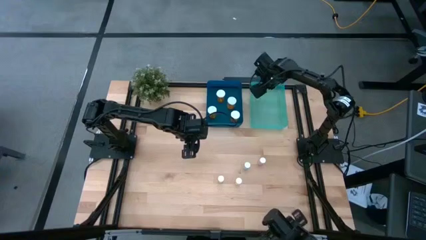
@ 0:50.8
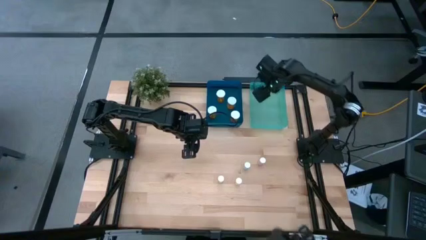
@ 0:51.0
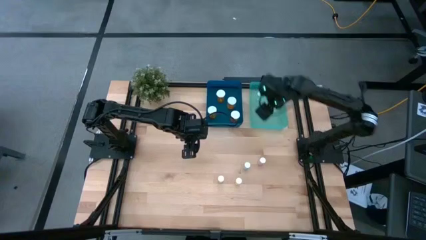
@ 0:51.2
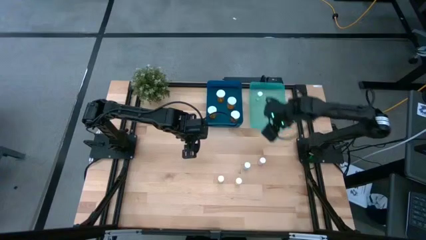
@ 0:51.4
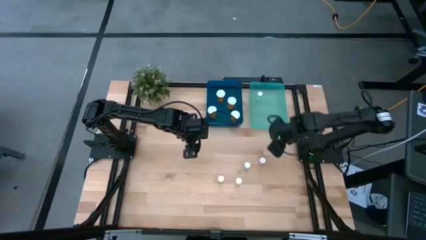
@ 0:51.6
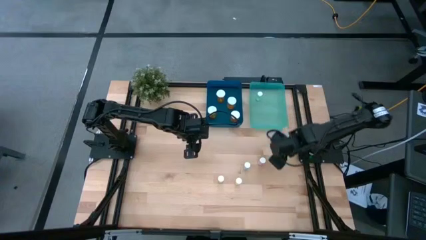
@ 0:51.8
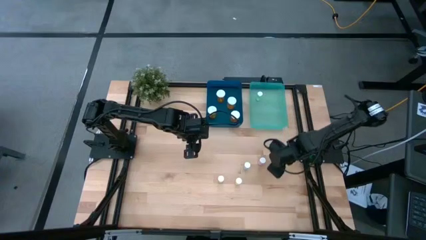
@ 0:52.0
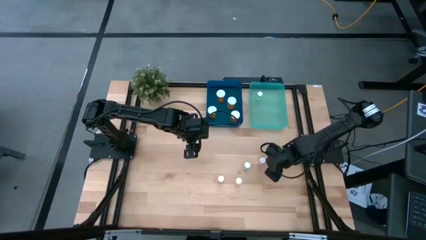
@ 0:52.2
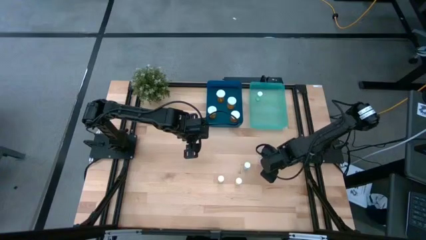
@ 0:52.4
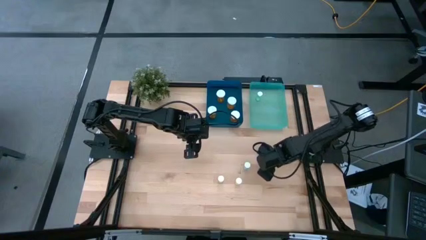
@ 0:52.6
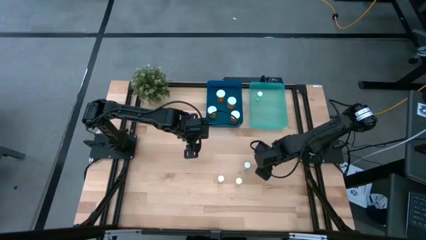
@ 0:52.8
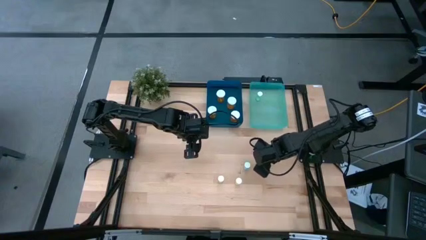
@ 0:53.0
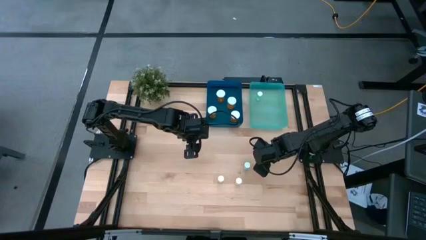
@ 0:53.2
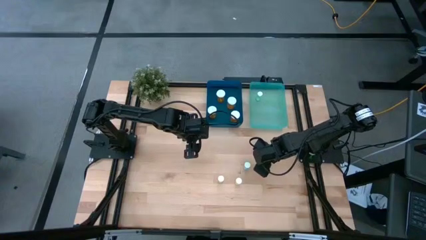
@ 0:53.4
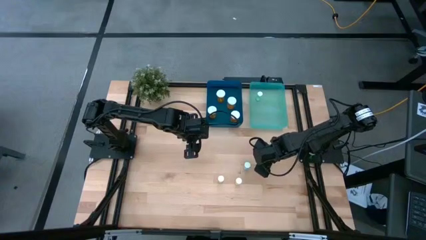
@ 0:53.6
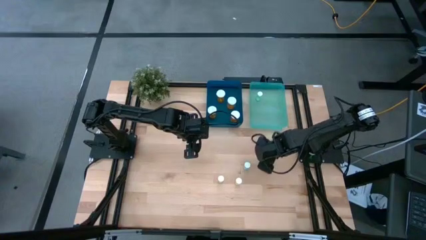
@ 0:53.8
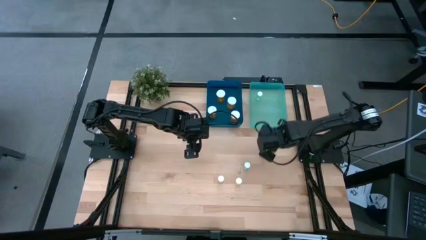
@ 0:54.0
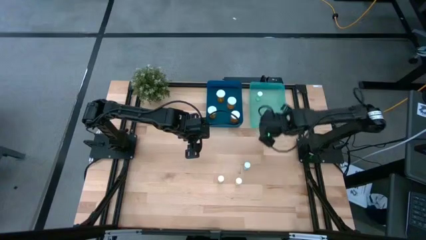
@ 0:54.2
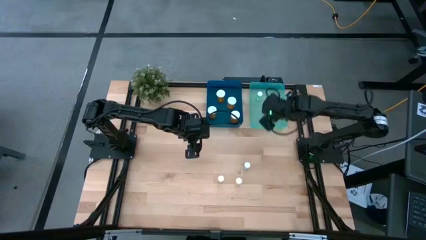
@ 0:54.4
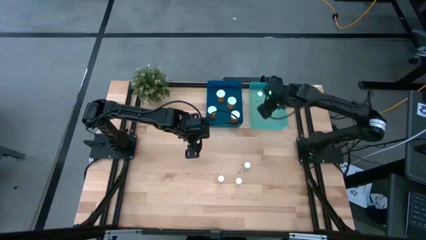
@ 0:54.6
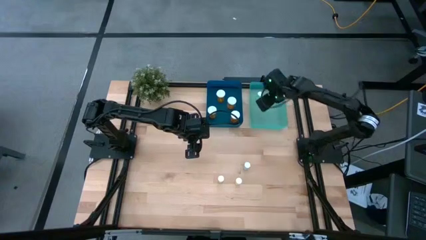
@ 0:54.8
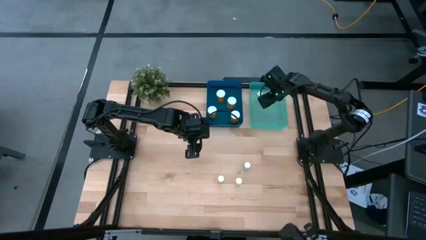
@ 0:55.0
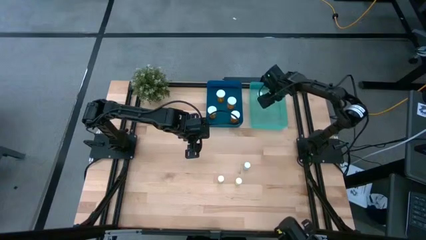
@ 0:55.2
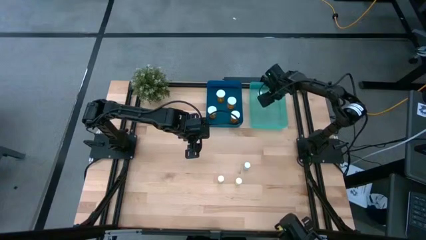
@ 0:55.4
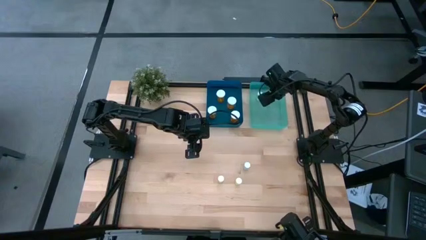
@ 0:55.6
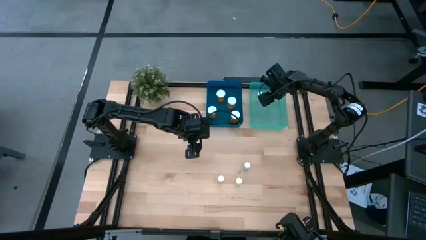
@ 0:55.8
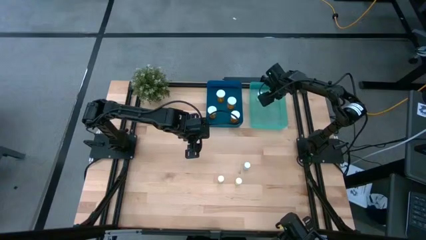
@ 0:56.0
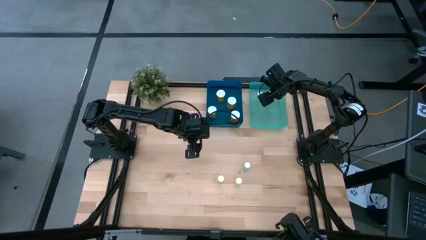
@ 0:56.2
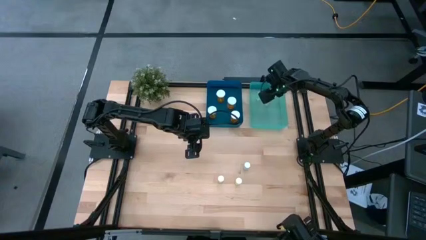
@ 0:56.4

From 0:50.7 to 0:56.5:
Task: Pick and place medicine bottles into bin by pill shape (circle, oval)
Put the small pink medicine bottle into the green bin

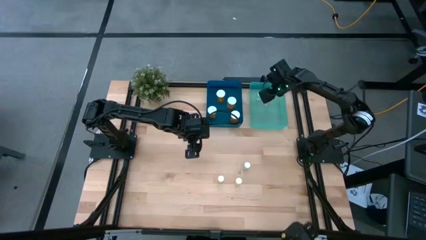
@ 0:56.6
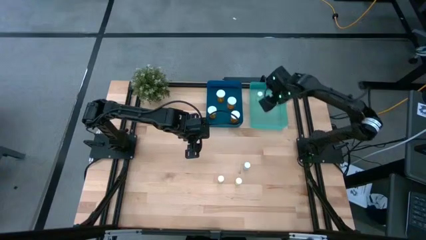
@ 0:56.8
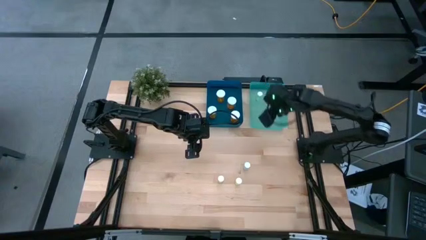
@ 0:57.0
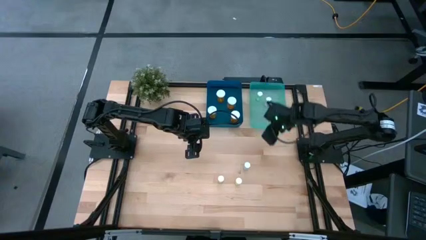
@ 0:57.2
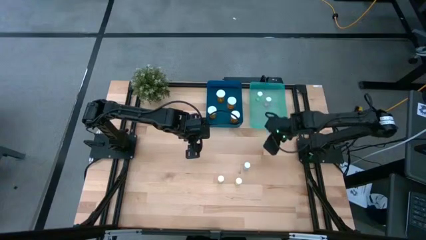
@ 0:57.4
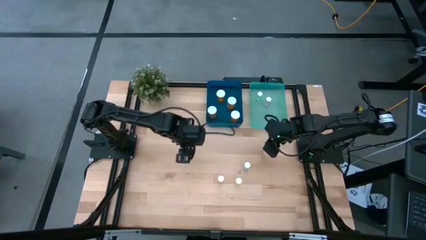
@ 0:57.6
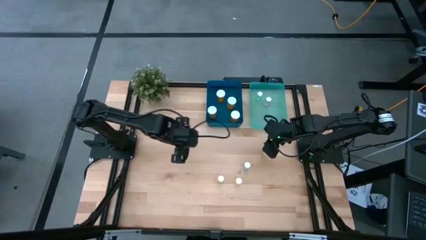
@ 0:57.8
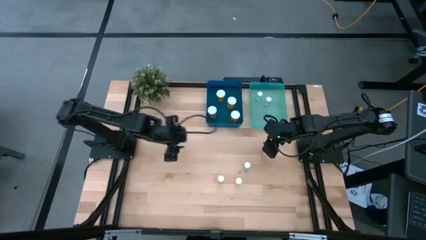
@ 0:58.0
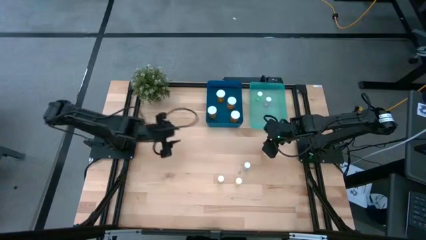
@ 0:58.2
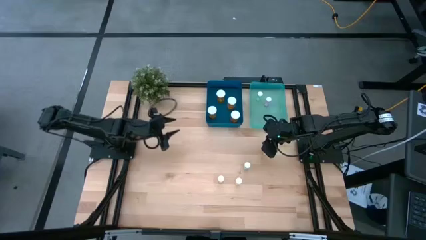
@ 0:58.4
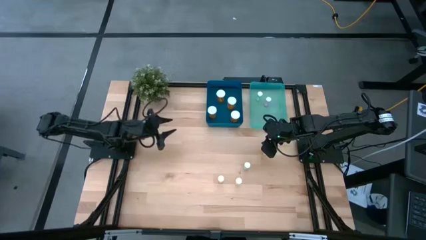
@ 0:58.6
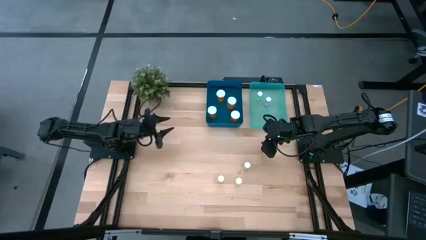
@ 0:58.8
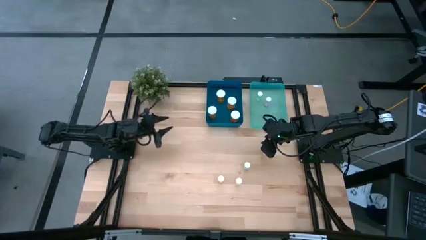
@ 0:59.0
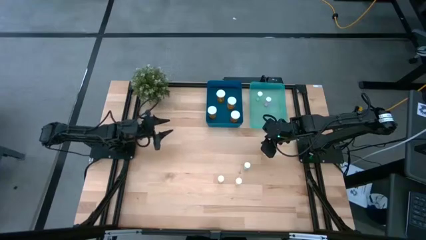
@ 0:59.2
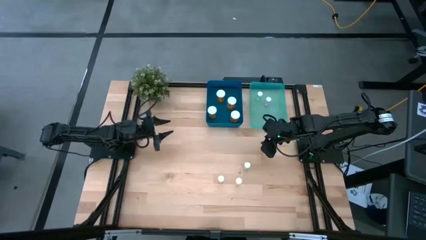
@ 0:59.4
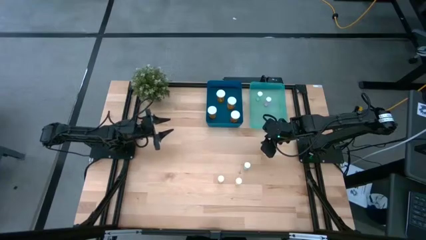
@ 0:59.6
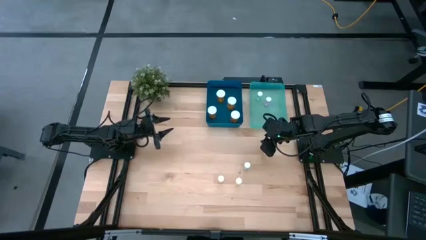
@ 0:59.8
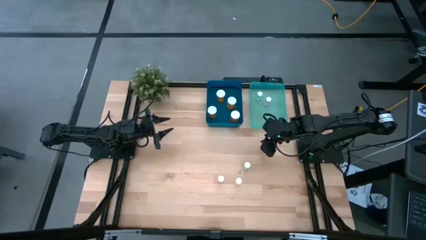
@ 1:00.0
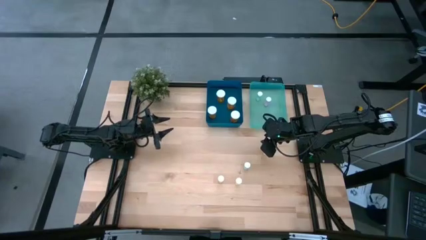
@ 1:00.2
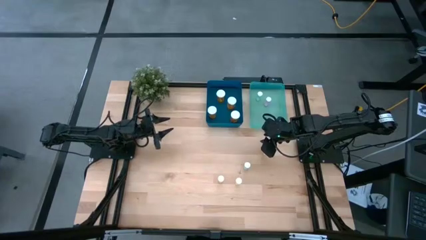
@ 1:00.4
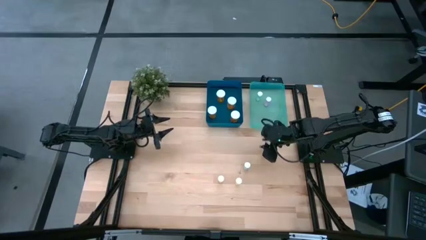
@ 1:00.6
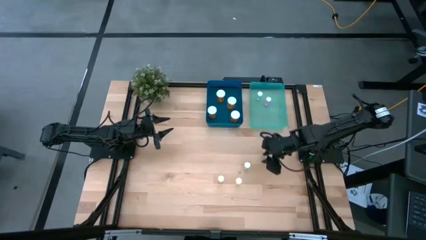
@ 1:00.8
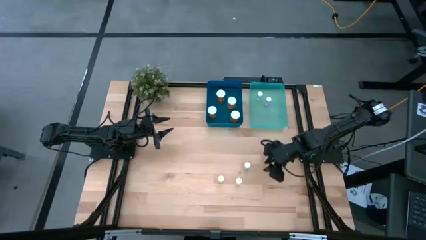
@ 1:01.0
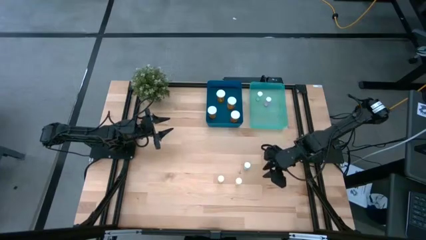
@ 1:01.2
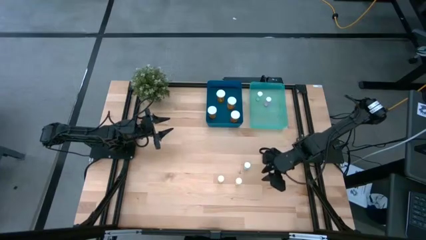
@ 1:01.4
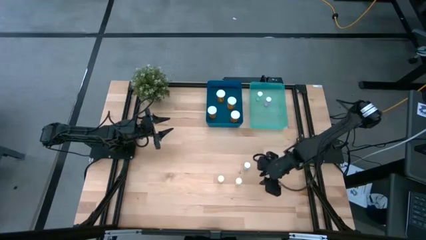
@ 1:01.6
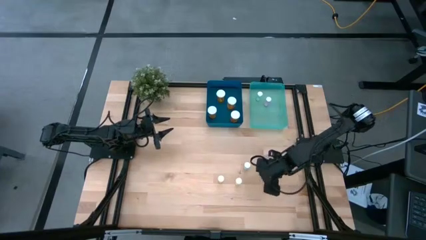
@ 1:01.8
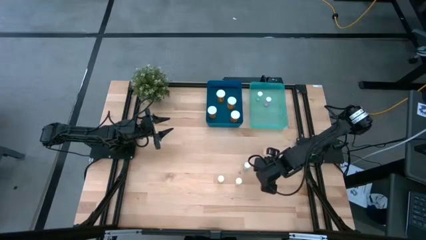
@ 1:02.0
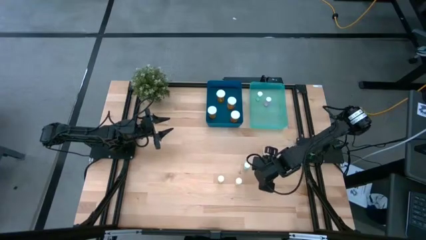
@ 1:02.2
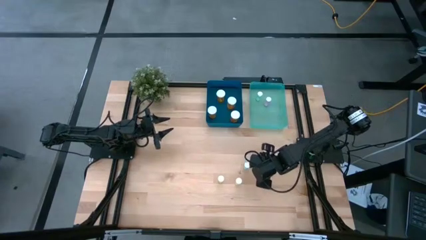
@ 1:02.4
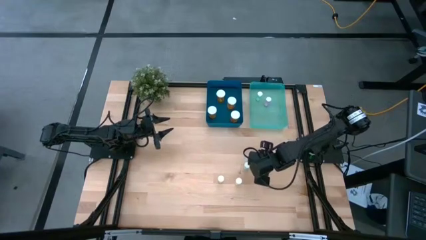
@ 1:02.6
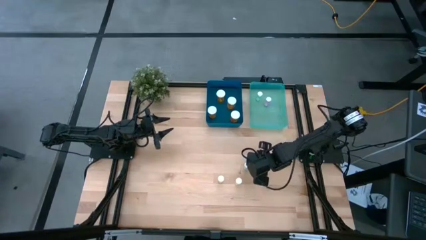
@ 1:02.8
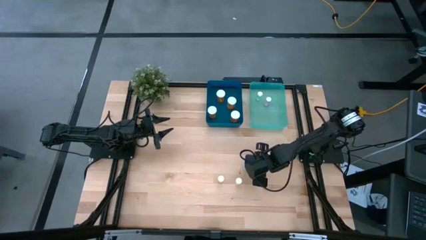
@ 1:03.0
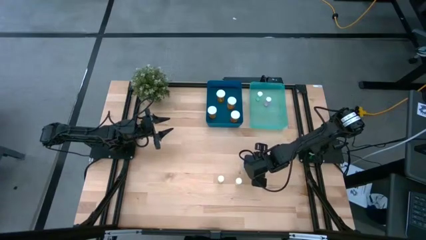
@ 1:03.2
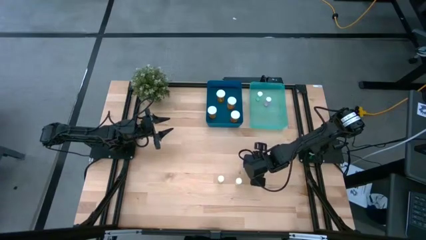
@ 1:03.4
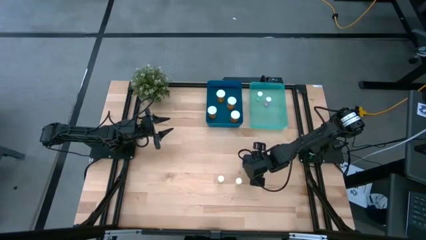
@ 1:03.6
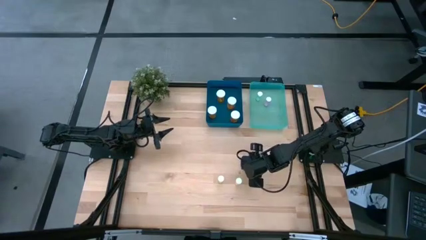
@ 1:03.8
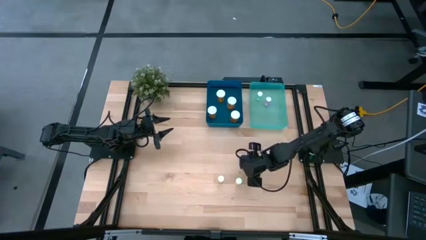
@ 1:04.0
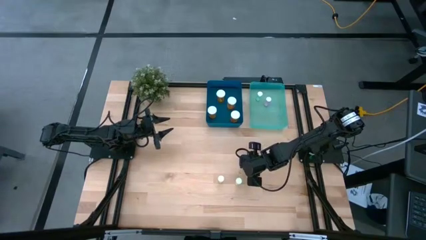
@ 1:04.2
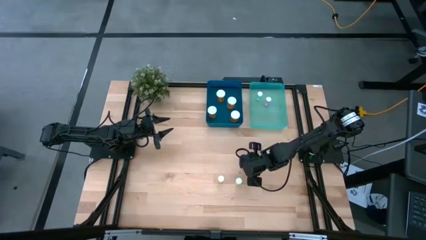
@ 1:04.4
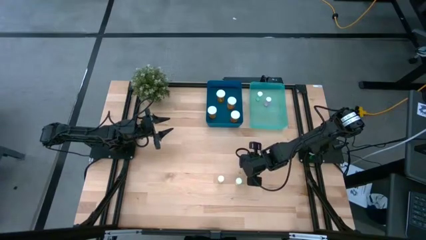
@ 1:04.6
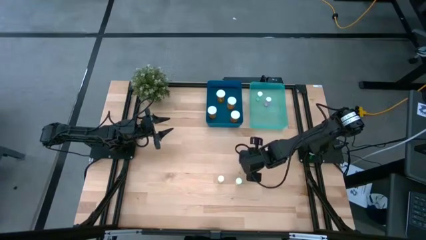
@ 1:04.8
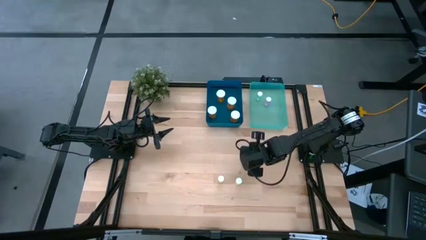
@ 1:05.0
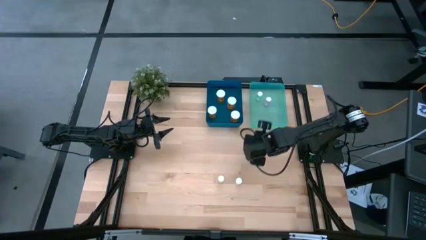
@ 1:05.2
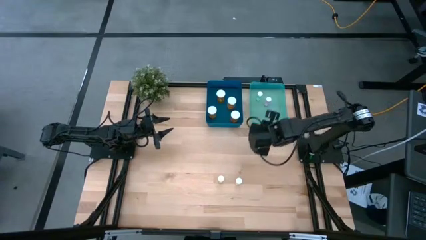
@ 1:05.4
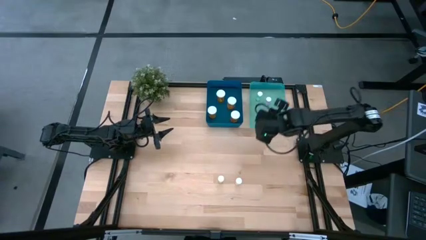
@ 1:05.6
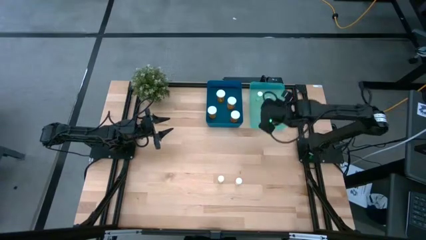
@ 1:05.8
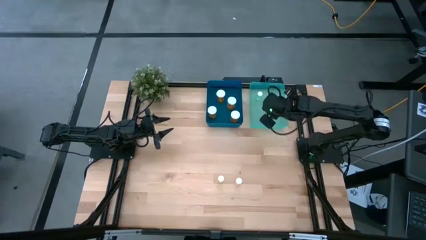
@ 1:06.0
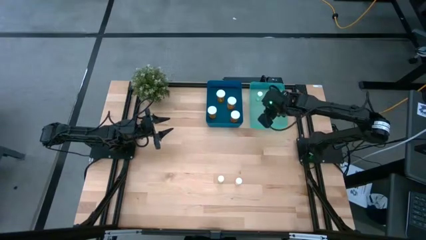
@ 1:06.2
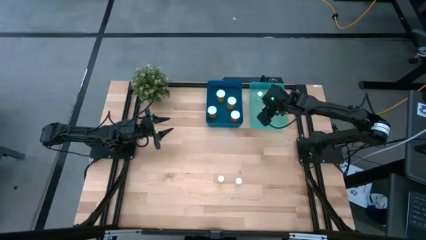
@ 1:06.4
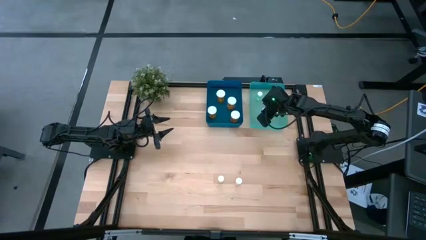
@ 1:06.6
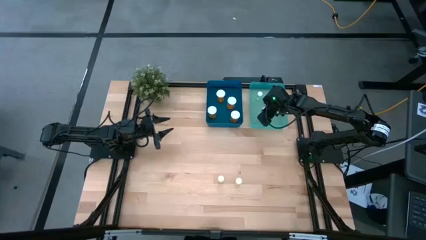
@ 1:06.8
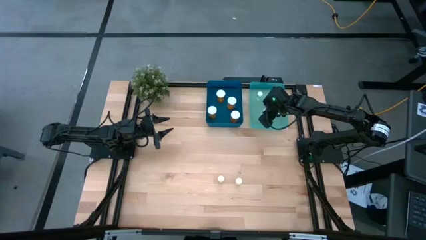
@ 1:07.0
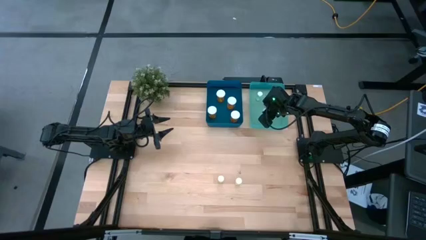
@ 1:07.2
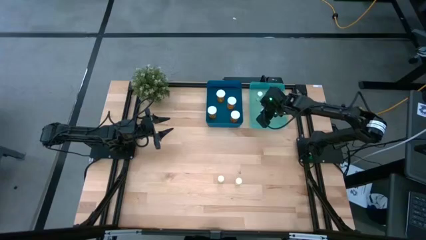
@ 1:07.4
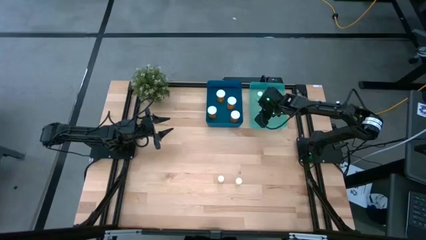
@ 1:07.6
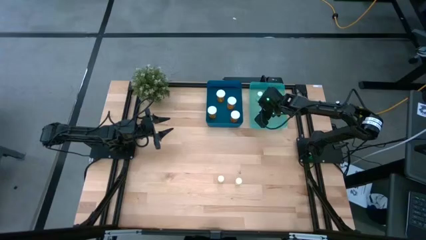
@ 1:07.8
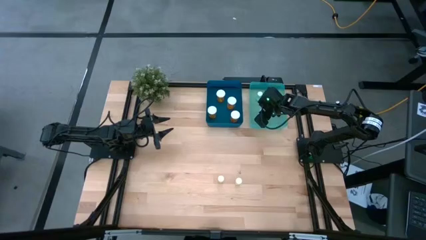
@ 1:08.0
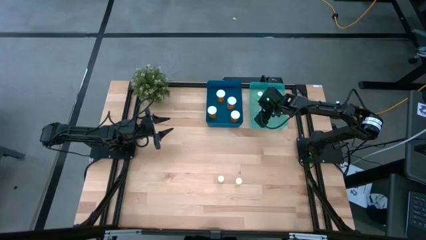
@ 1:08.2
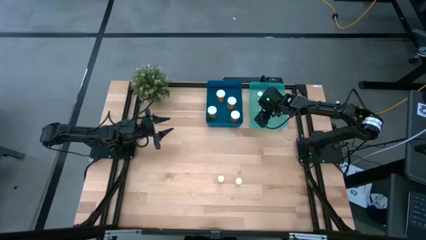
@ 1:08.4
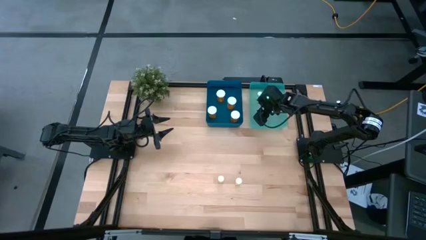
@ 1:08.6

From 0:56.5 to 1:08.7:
Put the small green medicine bottle into the green bin
